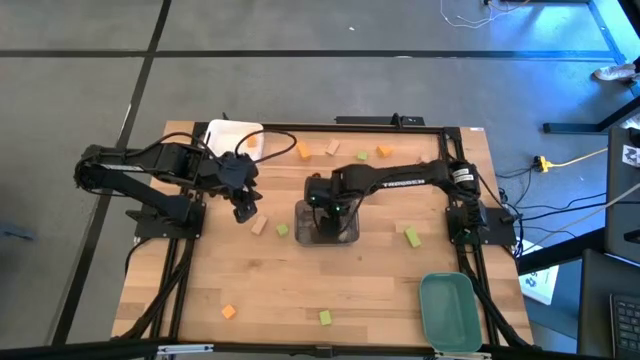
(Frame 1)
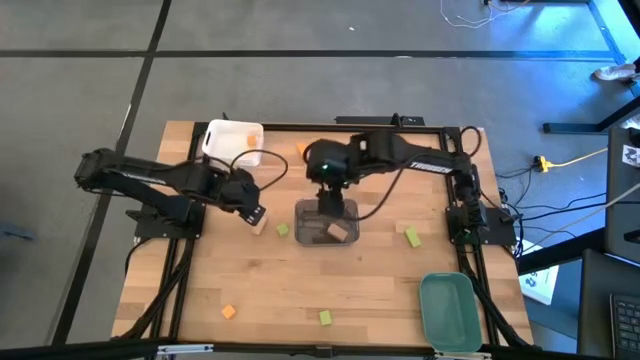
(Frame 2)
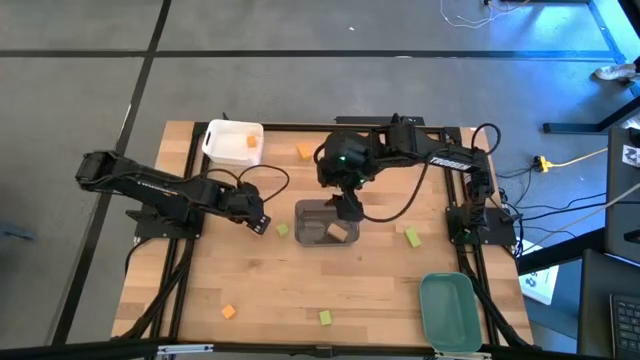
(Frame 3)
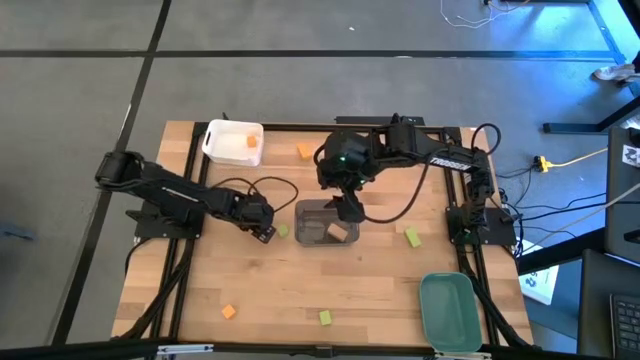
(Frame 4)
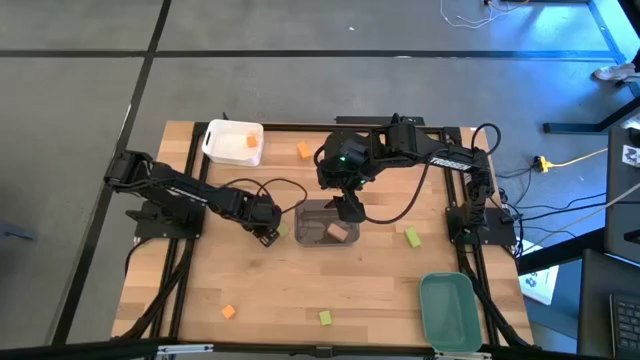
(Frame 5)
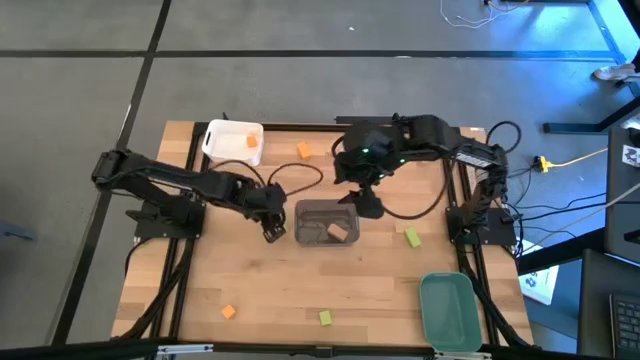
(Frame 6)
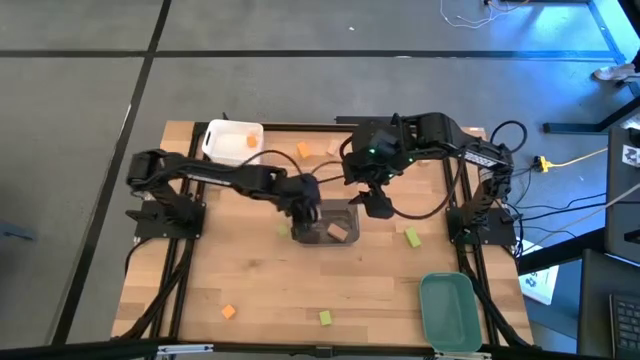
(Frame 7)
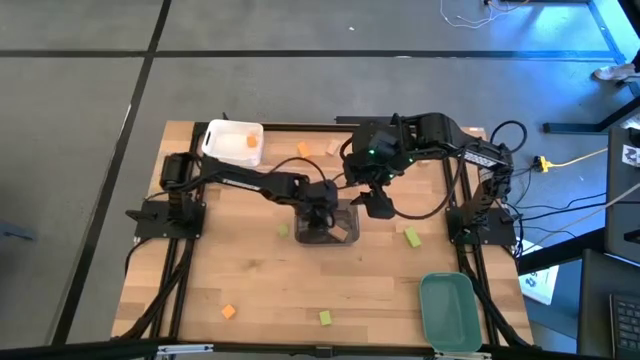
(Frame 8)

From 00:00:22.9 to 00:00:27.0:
Task: Sort & place blocks by color
Put the brown block into the black bin

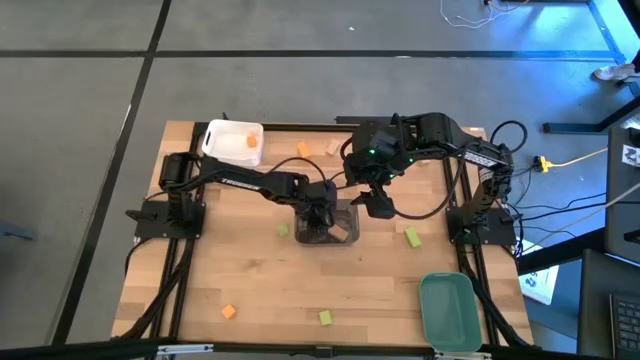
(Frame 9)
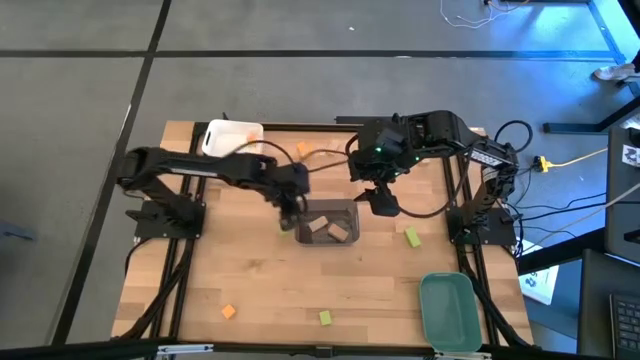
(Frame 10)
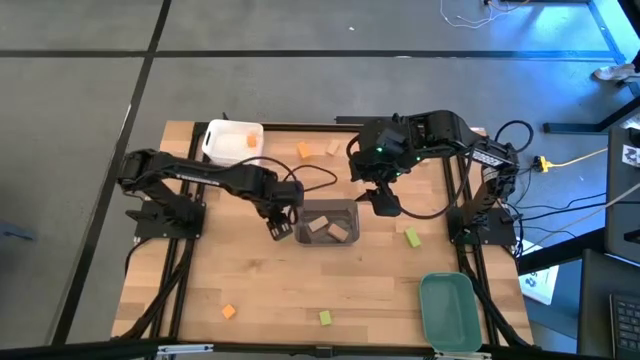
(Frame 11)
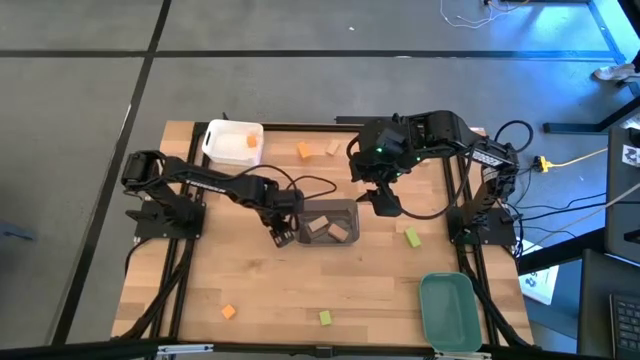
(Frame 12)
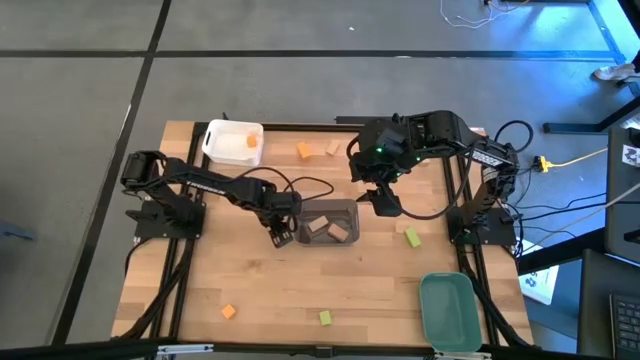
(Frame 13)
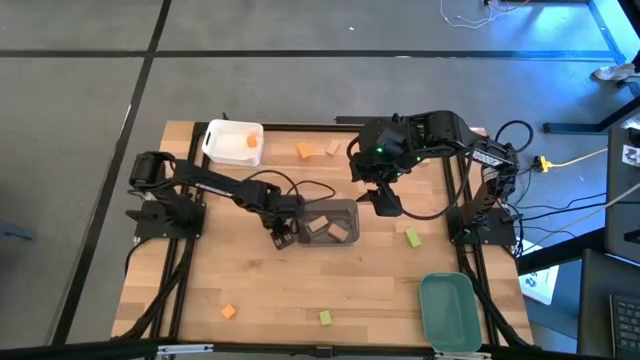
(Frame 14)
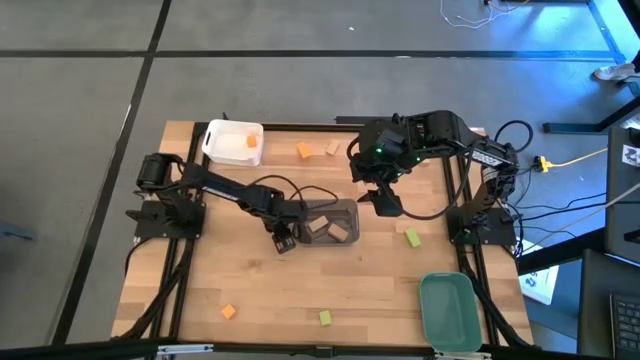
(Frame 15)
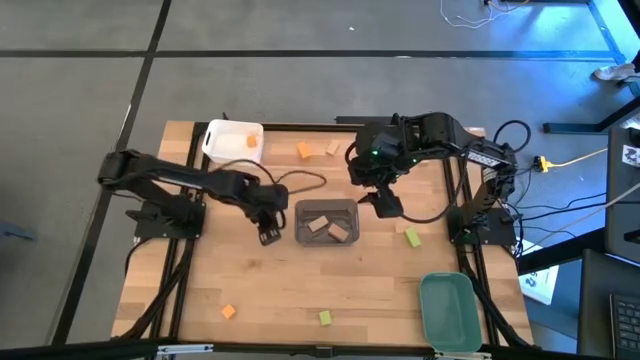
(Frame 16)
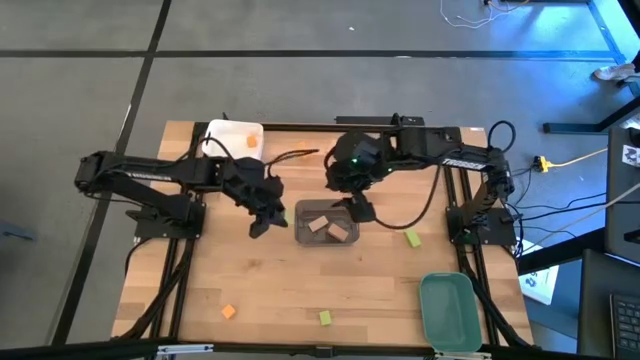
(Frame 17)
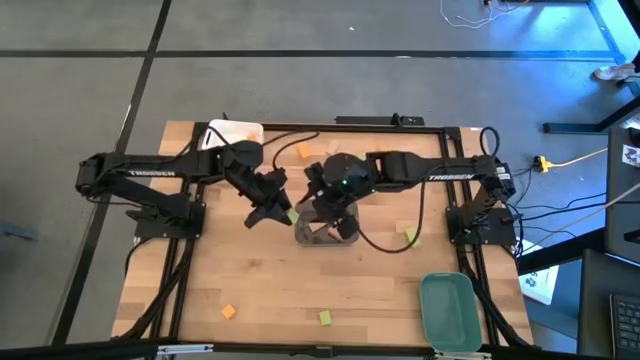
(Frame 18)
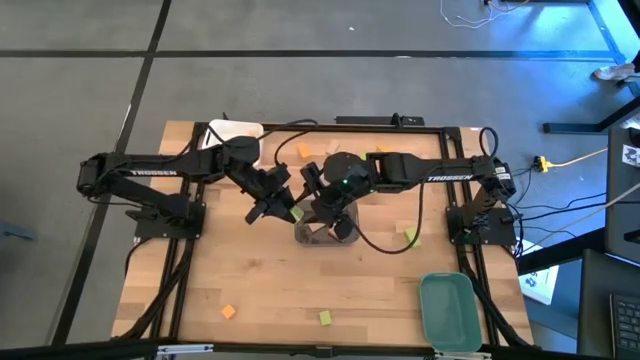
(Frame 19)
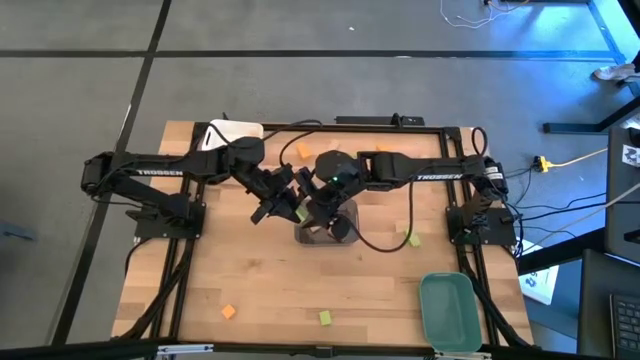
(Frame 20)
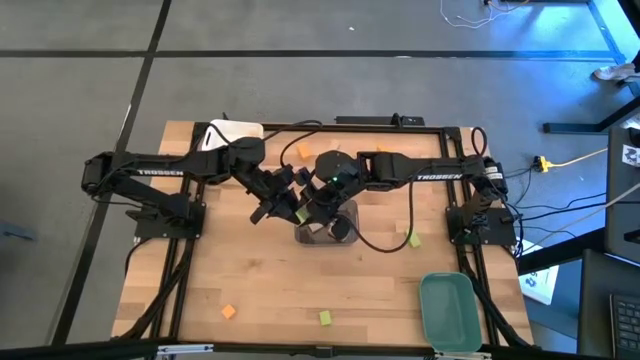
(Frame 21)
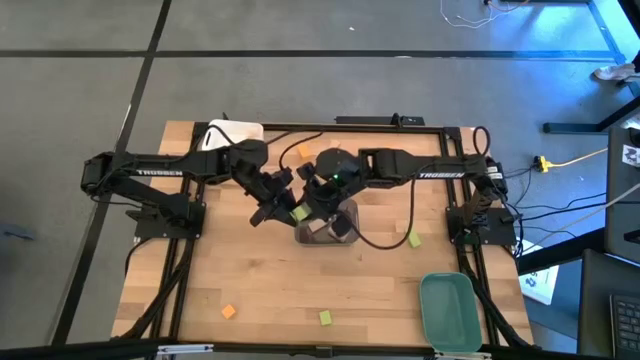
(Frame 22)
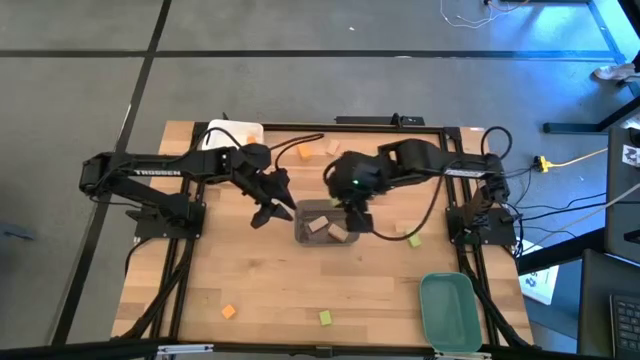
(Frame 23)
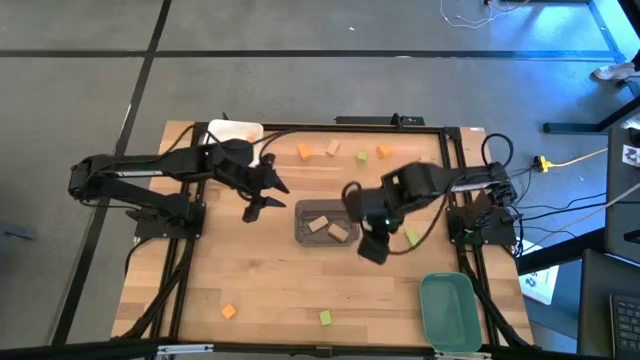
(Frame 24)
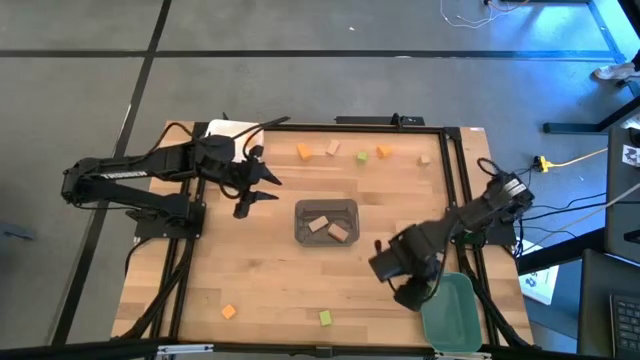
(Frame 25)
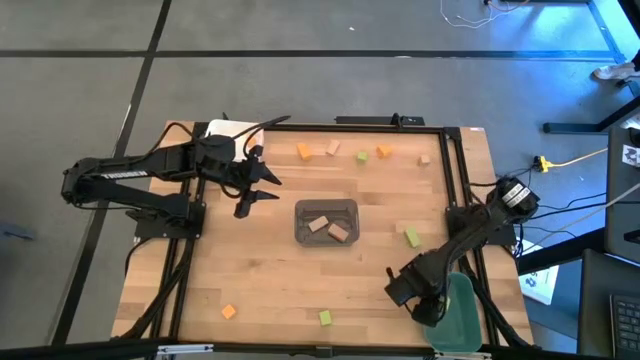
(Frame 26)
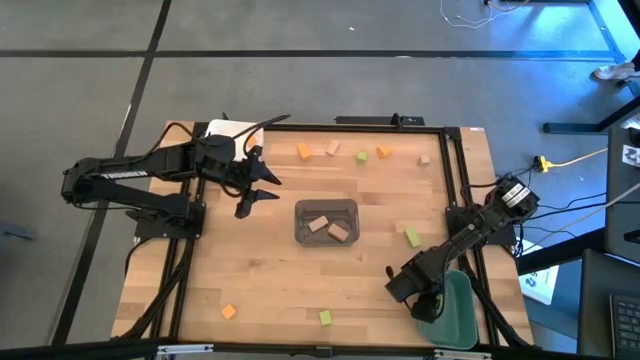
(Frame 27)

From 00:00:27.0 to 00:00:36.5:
Put the light green block into the green bin

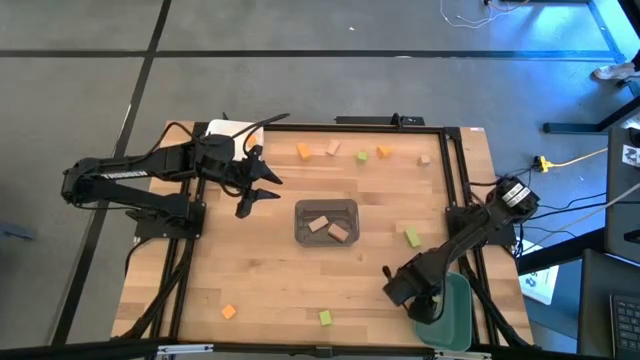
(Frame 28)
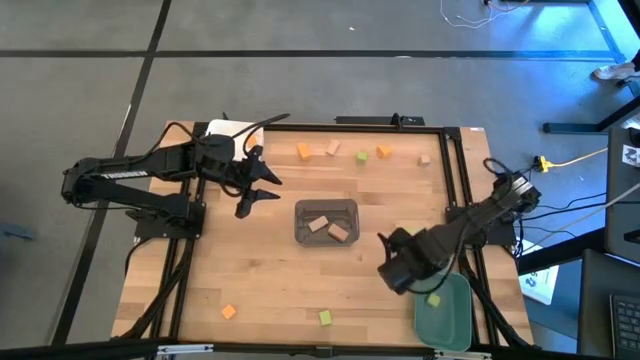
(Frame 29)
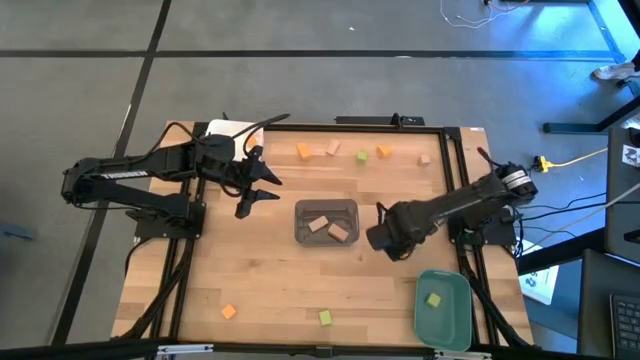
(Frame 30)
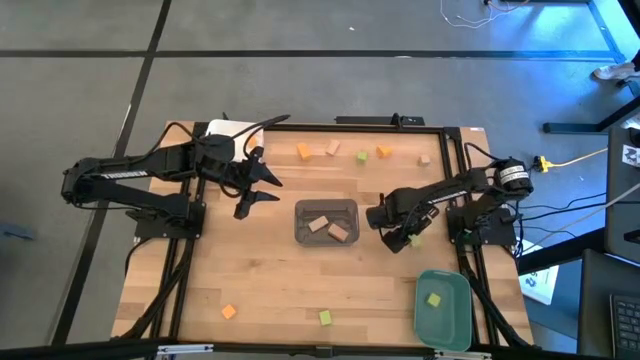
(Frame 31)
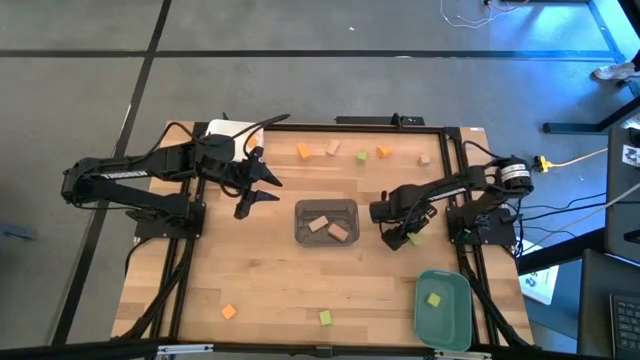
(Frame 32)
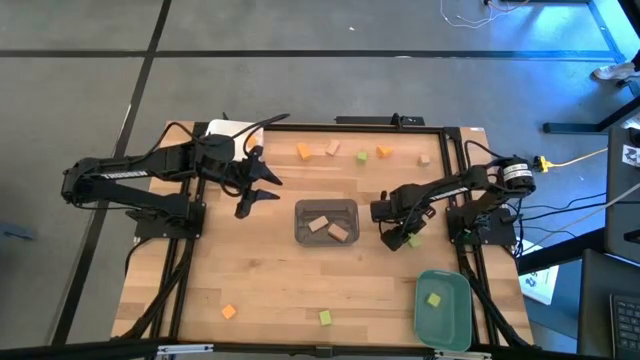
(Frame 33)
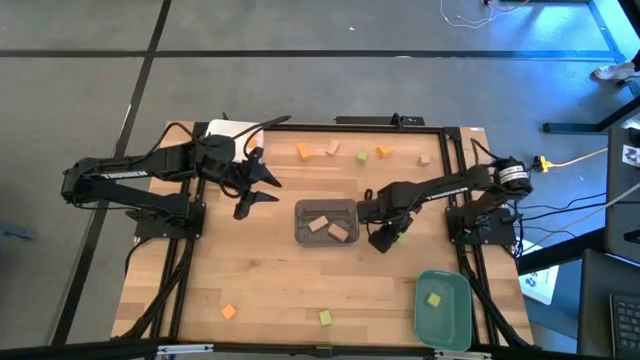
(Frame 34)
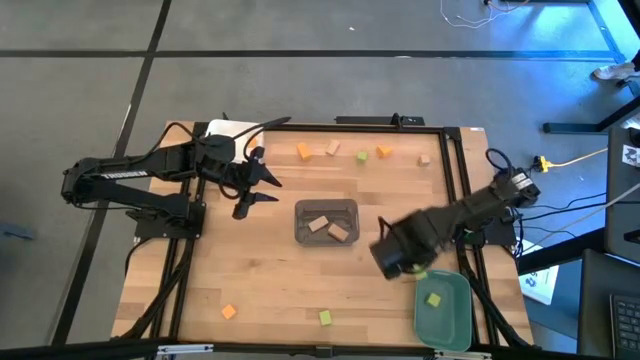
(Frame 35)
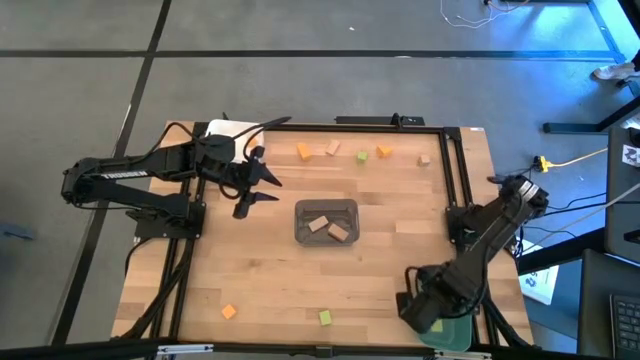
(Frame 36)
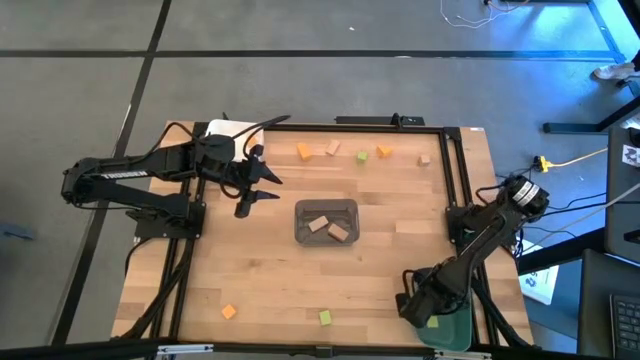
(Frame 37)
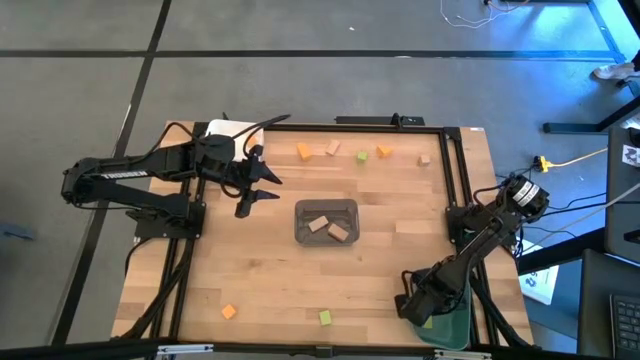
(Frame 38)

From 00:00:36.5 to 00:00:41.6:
Put the light green block into the green bin

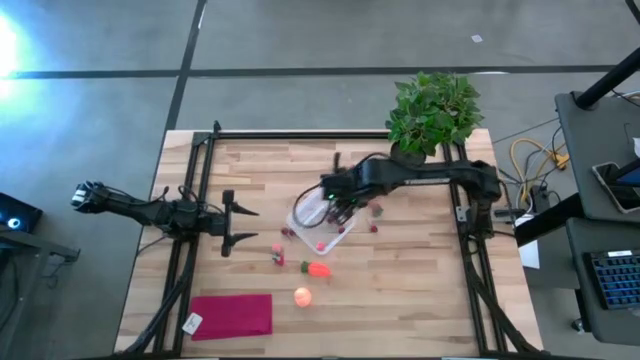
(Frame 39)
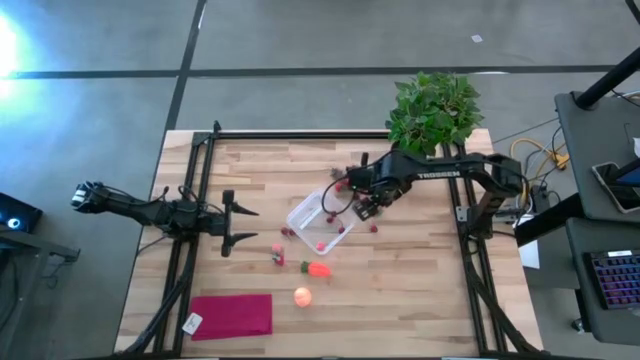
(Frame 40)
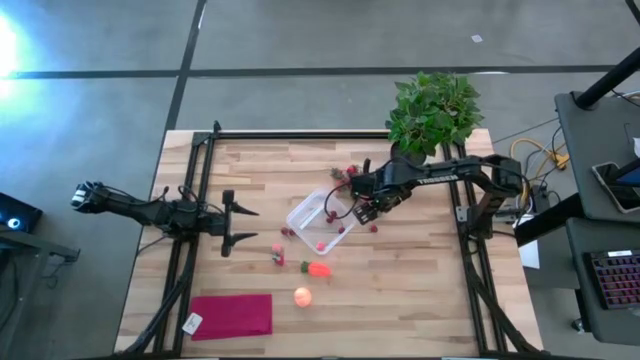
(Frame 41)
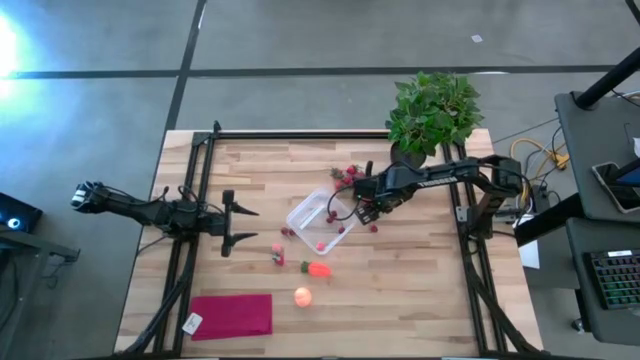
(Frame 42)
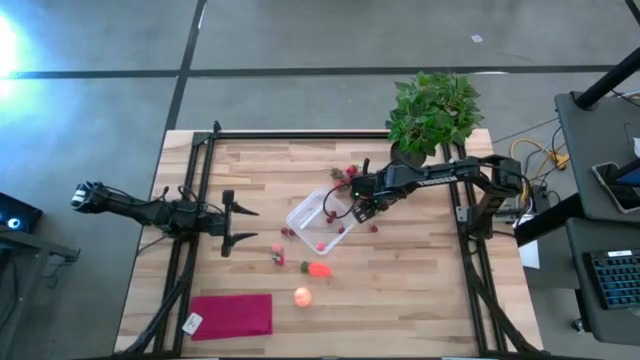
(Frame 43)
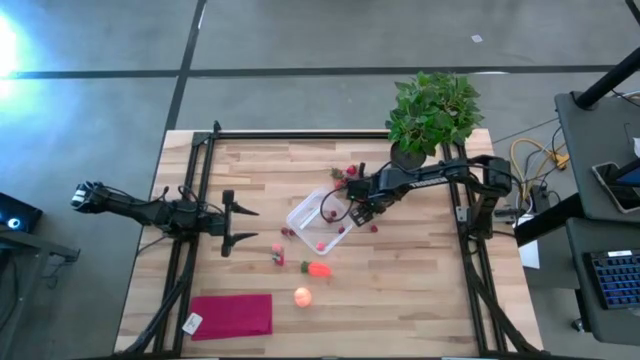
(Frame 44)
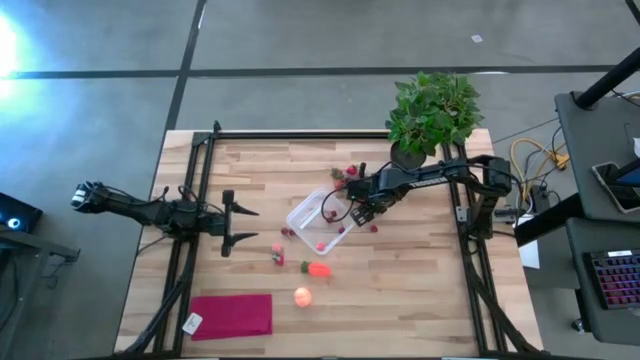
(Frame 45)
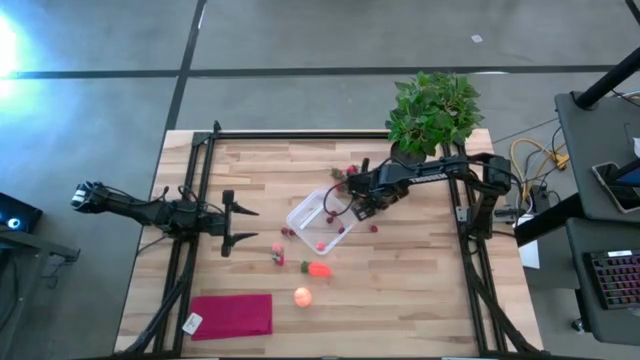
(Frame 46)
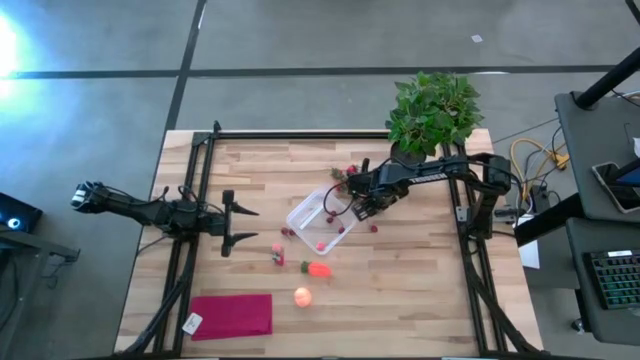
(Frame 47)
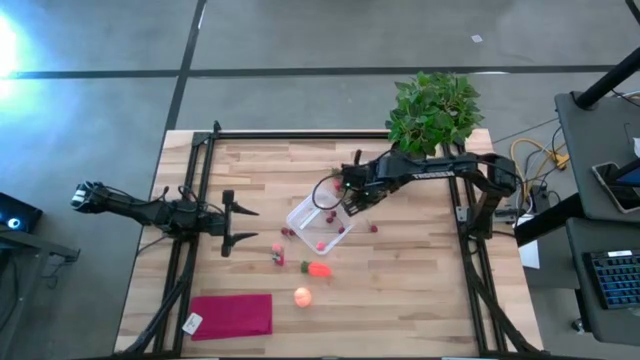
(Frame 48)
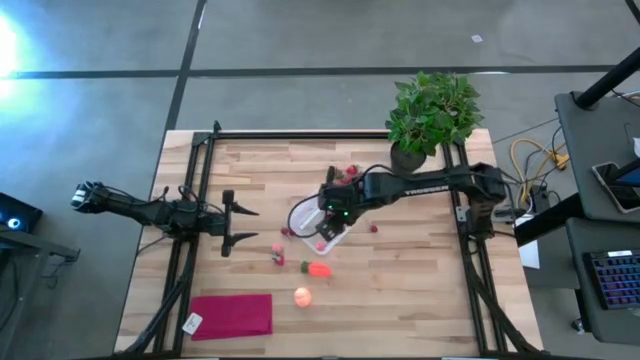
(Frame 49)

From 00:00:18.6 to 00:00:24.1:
Task: Pick and placing Produce into tupperware
Put the red strawberry into the transparent container
